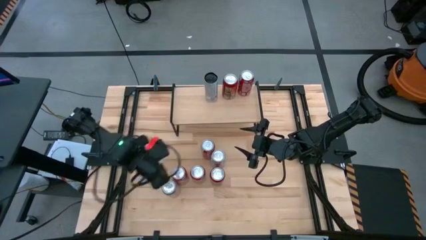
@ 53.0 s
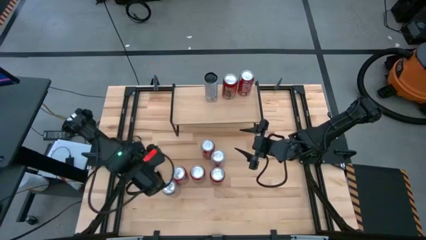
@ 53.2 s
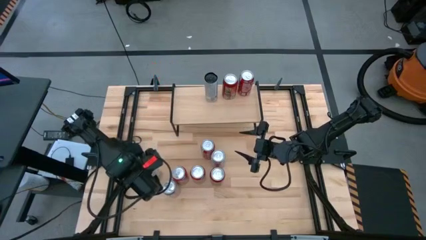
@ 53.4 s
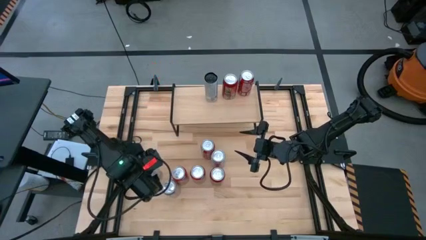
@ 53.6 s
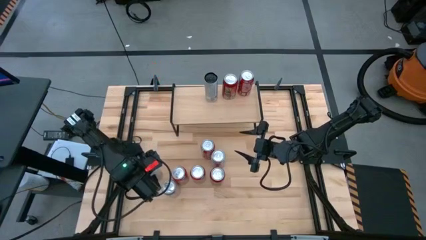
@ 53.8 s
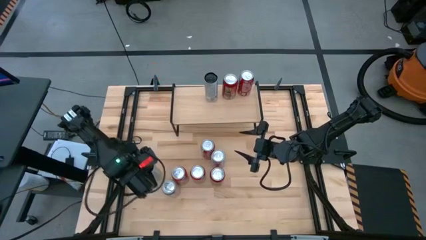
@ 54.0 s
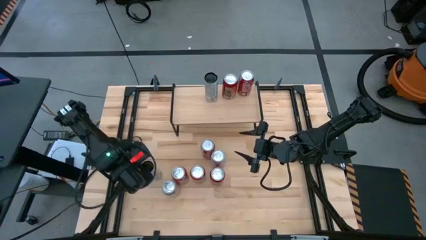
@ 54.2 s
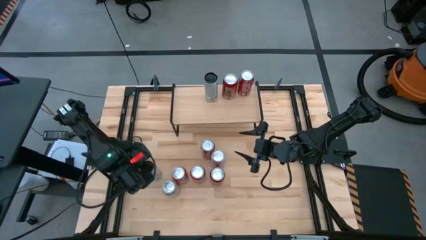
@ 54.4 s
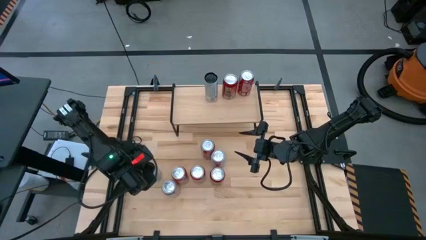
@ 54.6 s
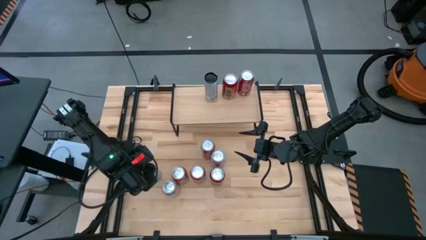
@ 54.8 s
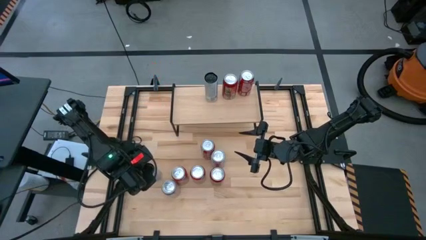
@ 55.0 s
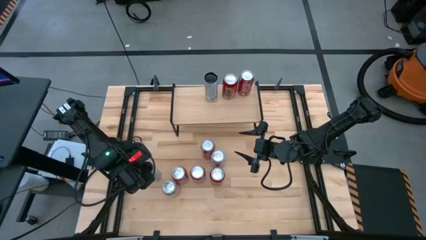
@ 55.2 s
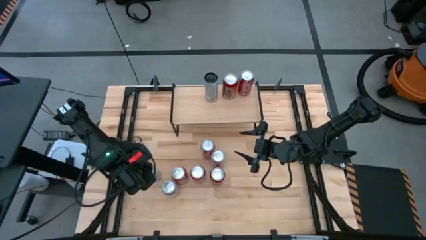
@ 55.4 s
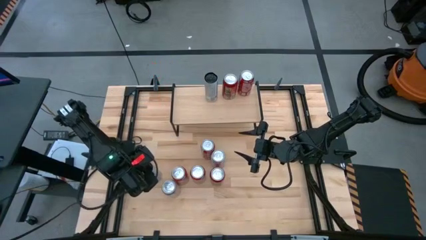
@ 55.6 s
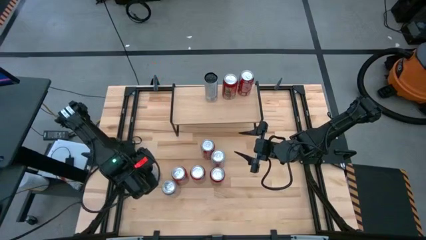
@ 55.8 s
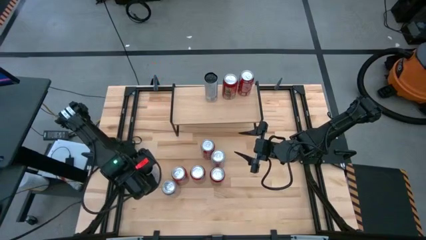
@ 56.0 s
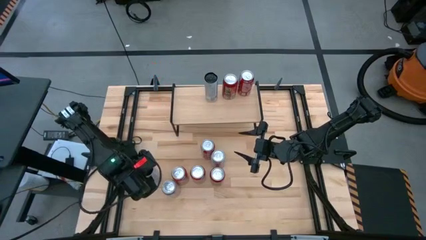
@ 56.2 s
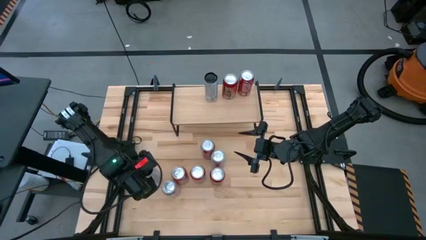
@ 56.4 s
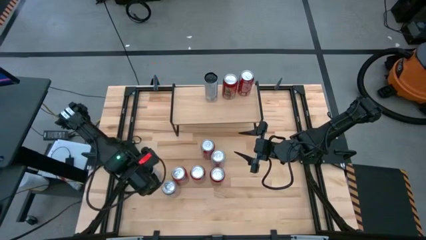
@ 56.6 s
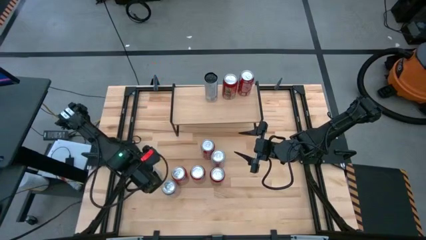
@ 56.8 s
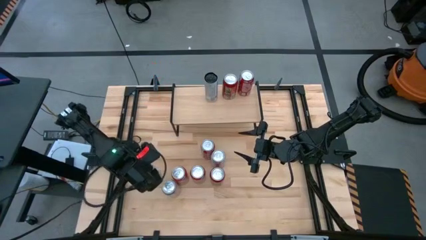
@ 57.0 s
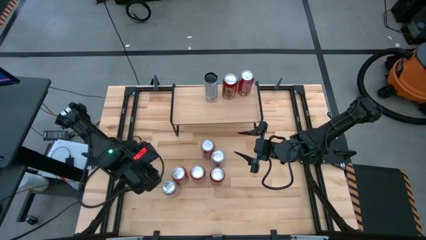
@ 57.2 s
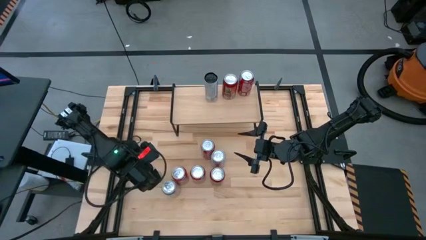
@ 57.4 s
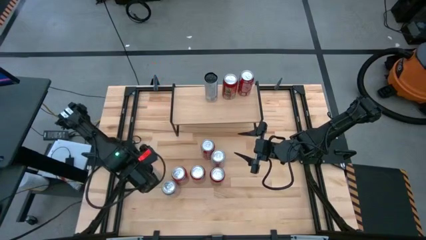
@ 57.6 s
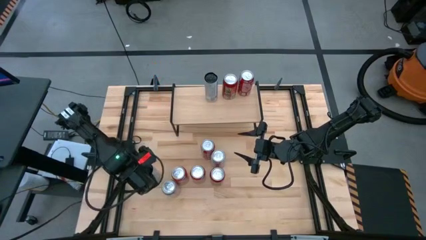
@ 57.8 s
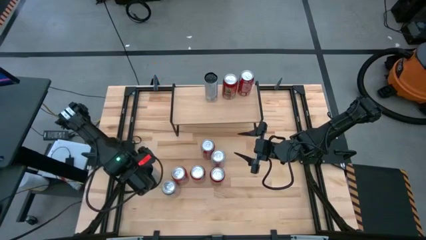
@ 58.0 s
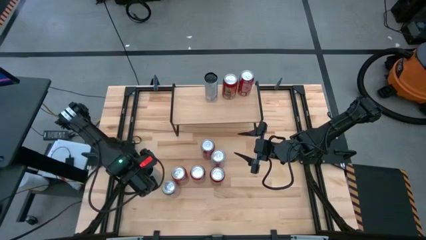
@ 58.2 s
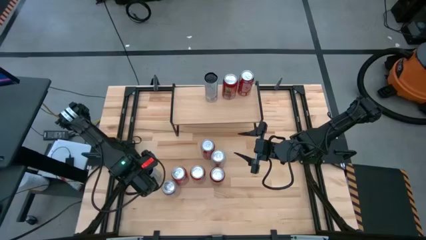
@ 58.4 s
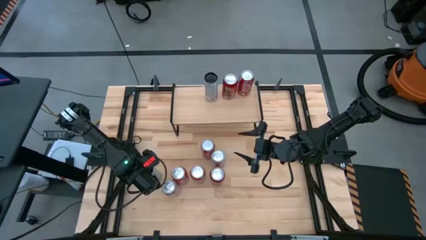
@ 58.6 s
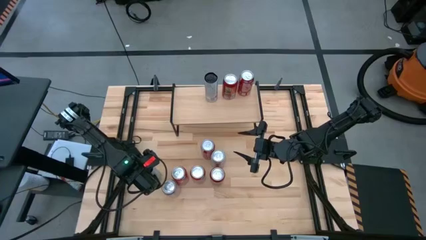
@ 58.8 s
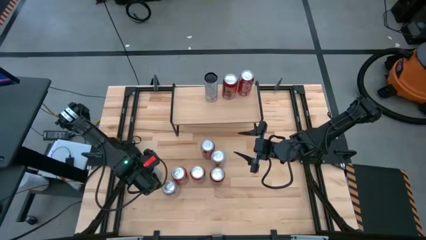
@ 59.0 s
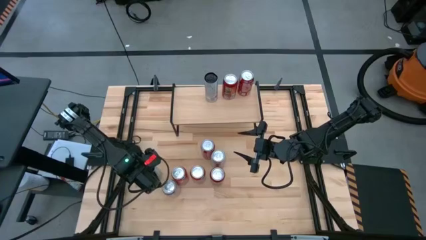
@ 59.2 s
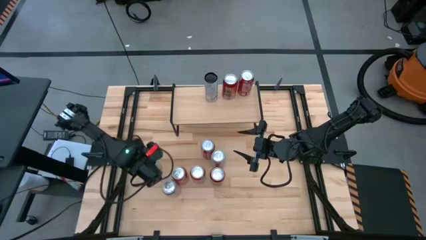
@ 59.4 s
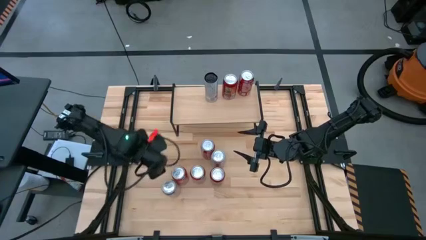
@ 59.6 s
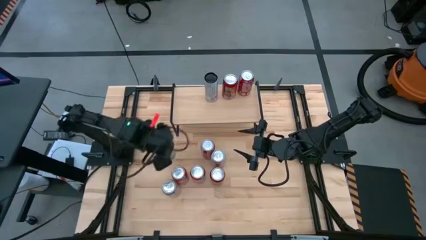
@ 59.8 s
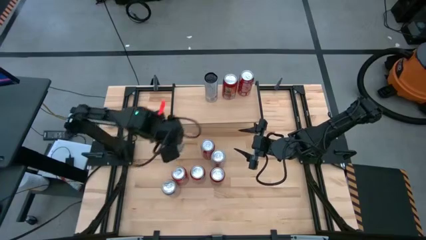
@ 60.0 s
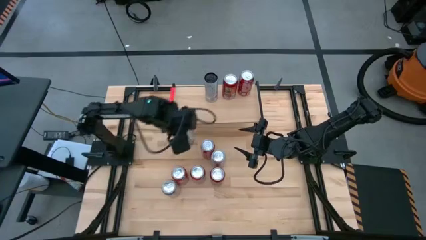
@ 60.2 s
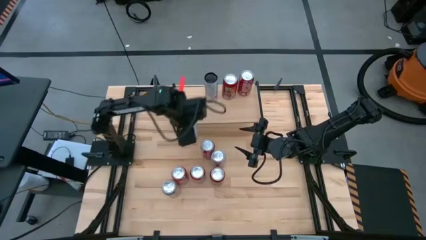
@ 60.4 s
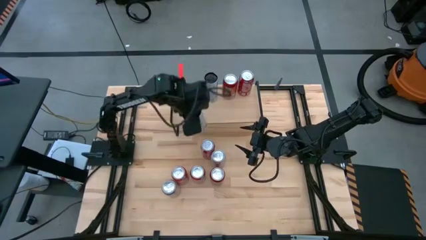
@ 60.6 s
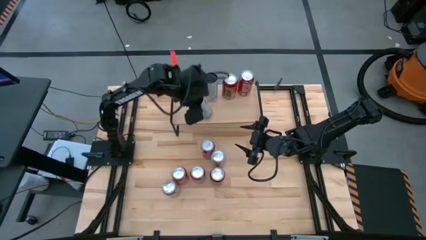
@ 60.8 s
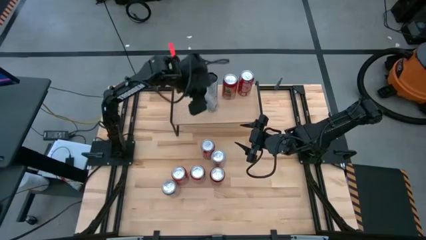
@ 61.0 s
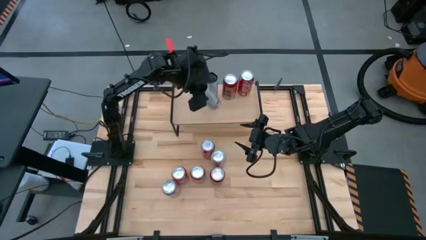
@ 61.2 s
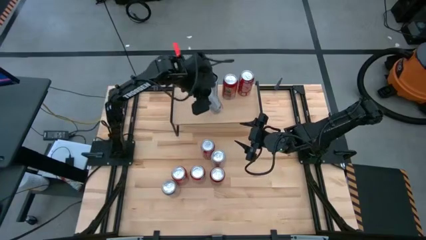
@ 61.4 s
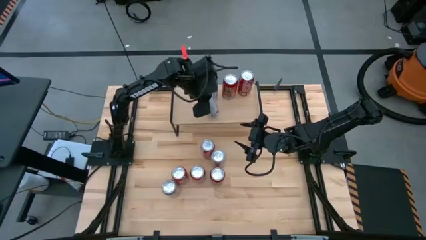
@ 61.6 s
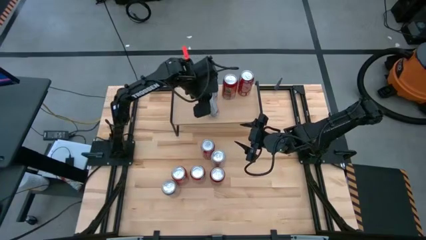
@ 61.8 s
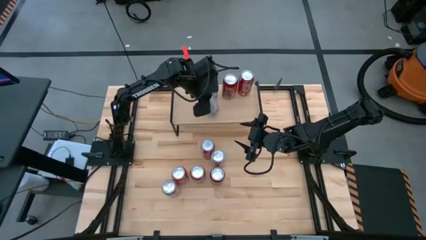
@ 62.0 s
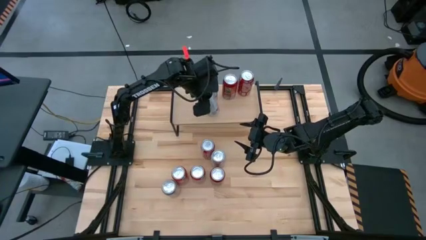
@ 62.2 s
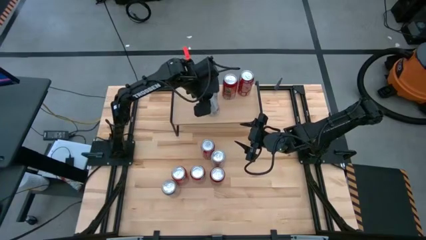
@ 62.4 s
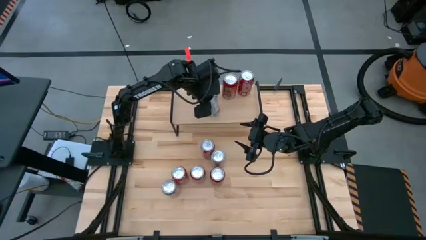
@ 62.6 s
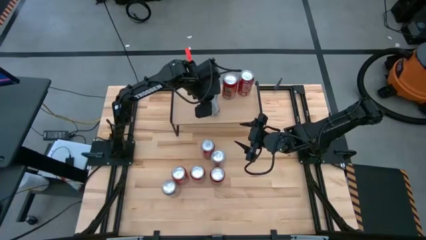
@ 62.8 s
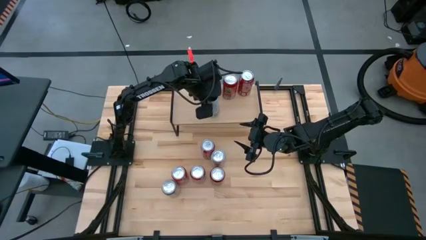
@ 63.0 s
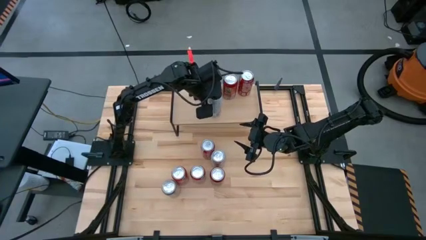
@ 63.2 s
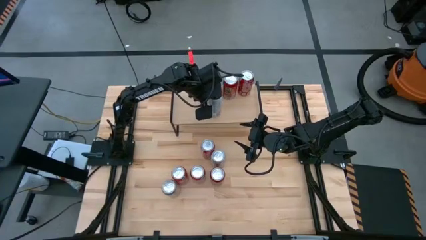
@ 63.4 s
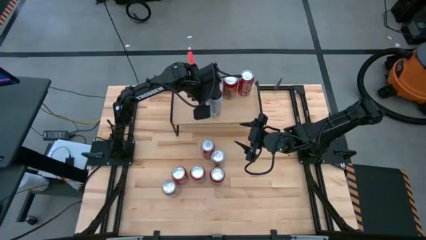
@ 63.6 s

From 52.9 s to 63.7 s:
Task: Place canned beverage on shelf
Put the black soda can on the shelf aligned with the other black soda can

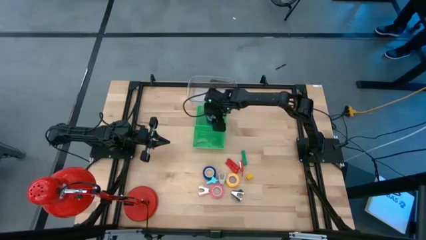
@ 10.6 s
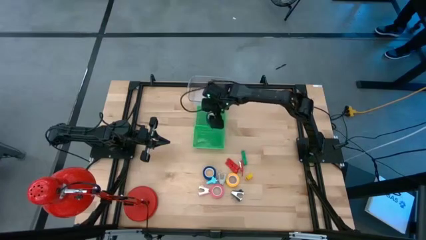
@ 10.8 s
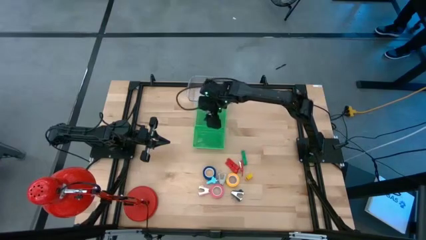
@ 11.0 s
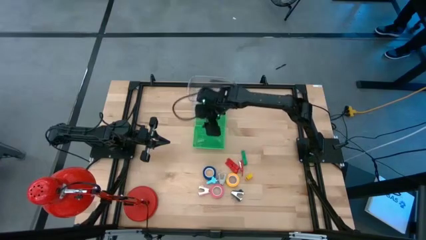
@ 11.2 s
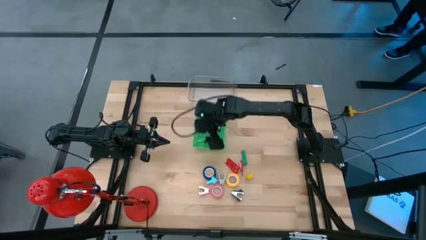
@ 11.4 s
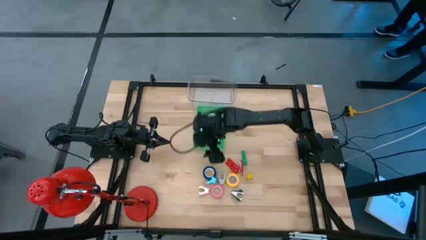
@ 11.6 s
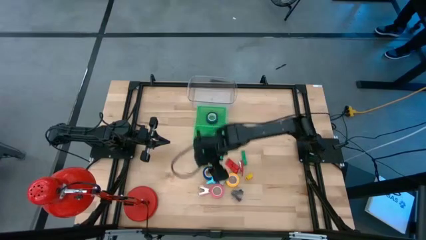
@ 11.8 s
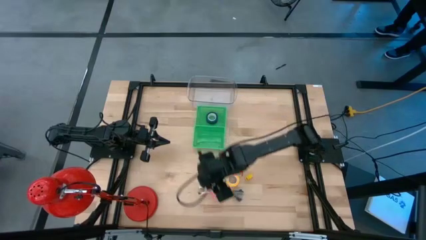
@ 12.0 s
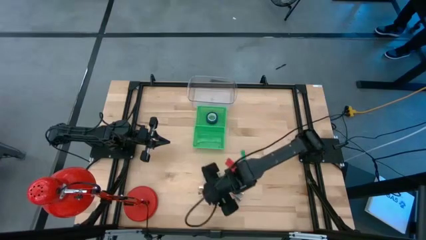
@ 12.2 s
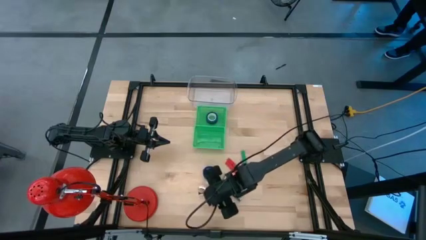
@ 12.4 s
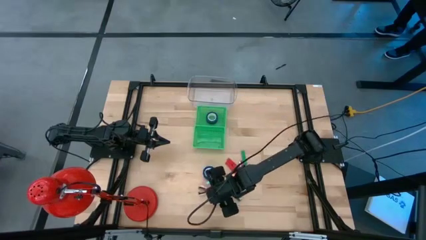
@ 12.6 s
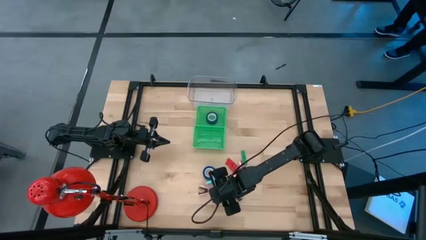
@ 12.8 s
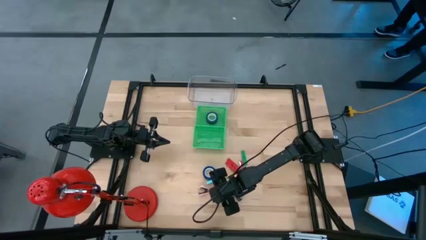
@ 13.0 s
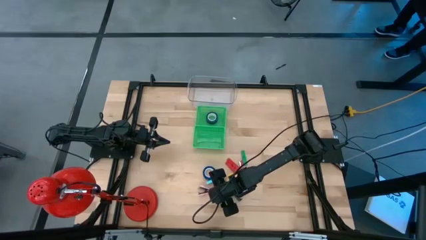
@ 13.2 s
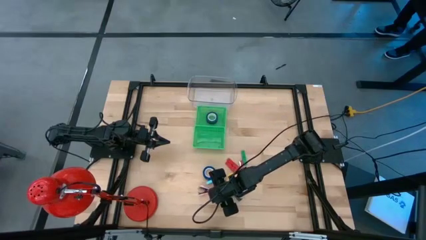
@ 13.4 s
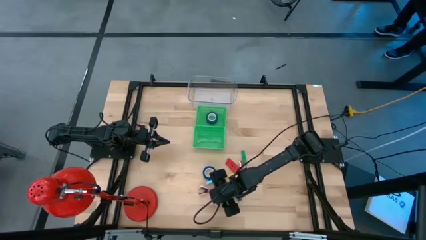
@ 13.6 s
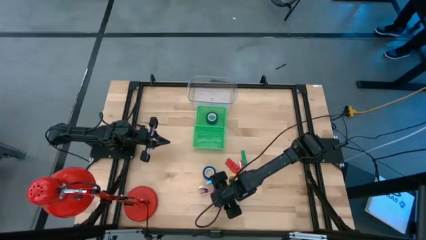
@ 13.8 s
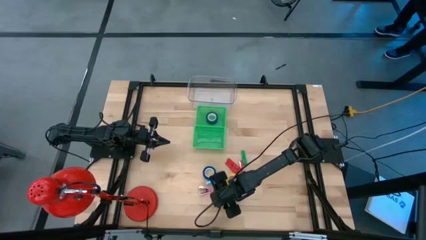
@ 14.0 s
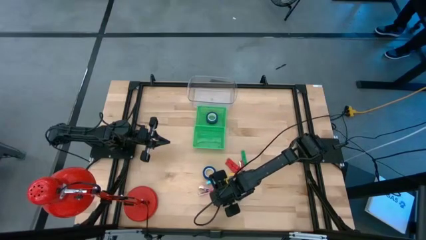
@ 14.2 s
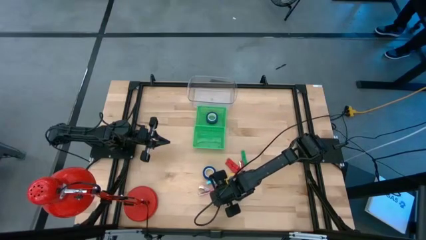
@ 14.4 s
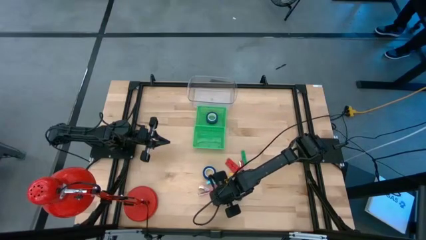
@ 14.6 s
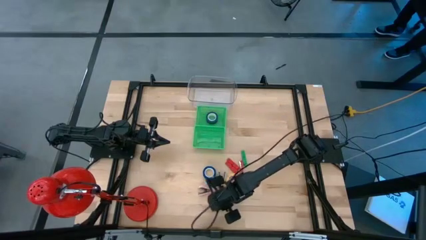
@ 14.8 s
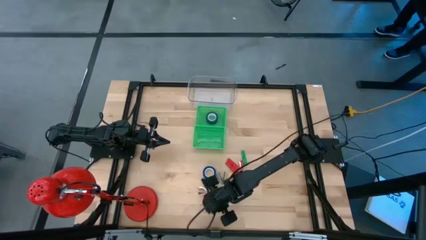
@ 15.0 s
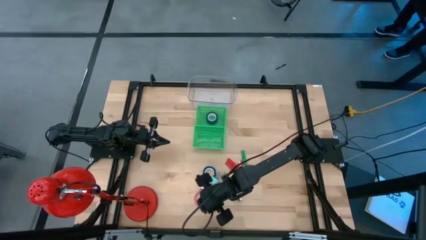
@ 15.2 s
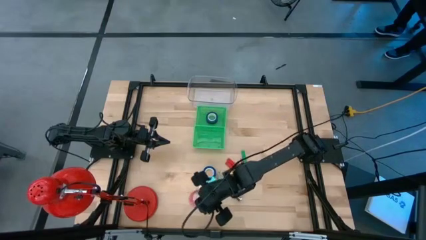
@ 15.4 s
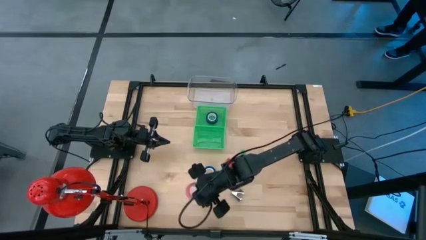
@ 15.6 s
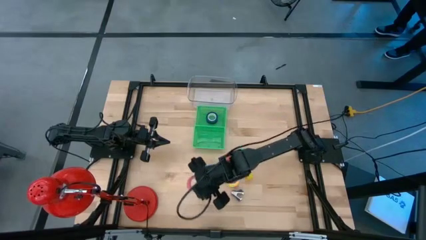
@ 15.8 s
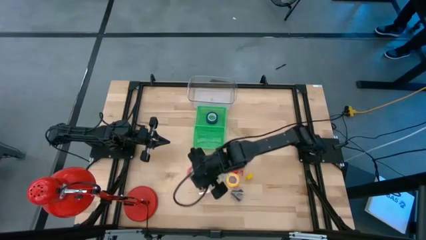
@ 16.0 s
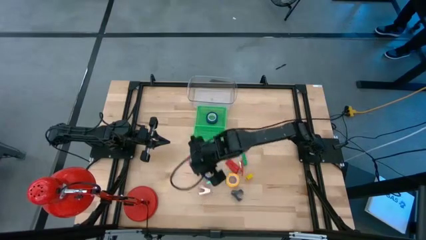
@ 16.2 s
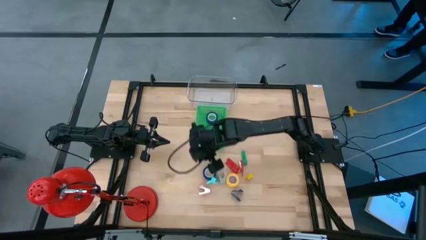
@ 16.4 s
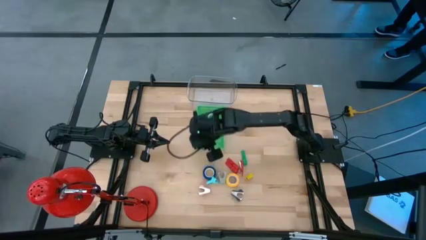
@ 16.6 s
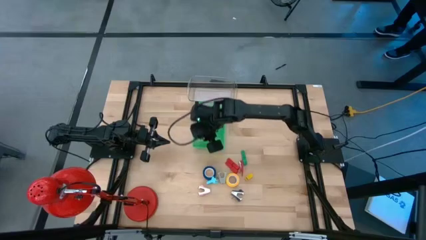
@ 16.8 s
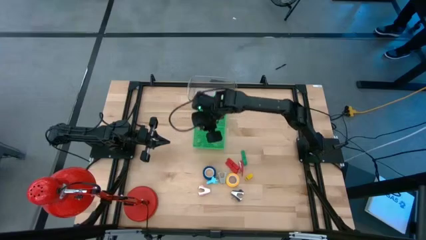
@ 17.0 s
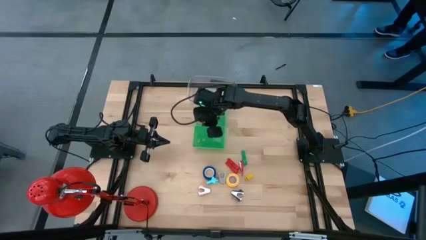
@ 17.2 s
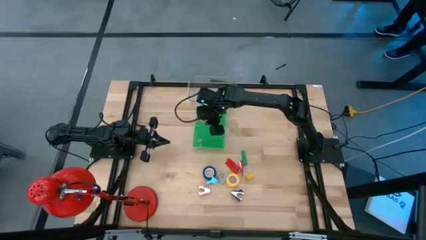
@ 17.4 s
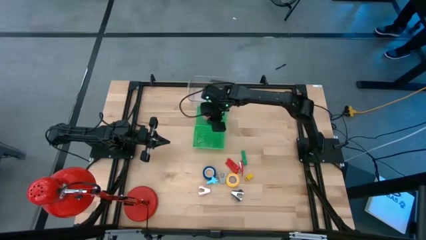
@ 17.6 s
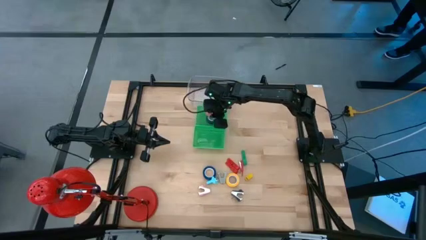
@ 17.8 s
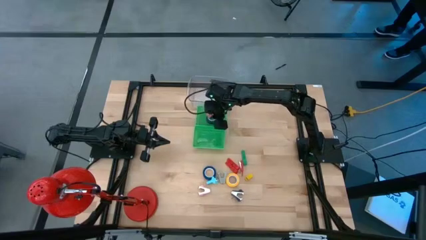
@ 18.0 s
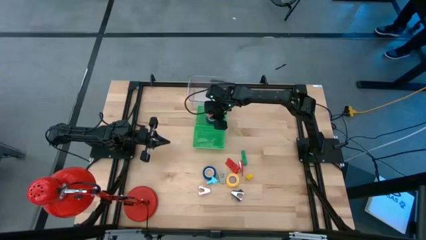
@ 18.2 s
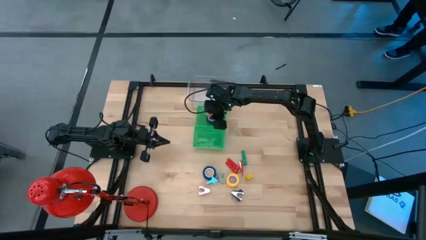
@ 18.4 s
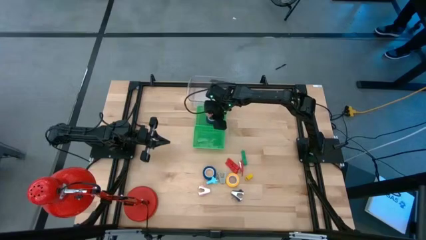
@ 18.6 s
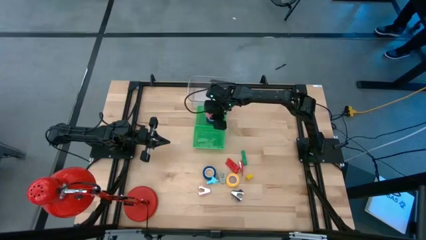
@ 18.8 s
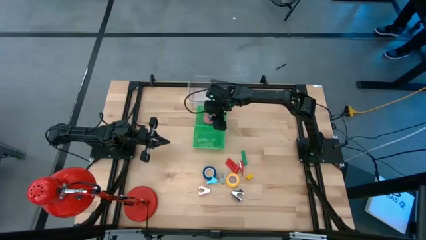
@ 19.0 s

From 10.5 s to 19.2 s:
Task: Pick and place Stapler, Stapler remover, tape
Put the pink tape into the top green bin
